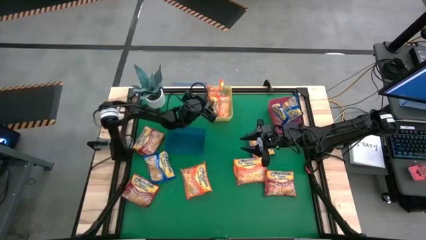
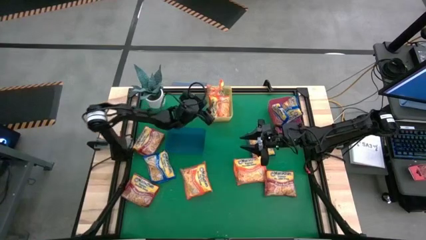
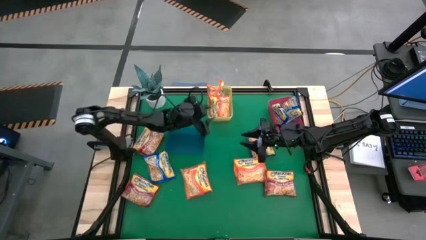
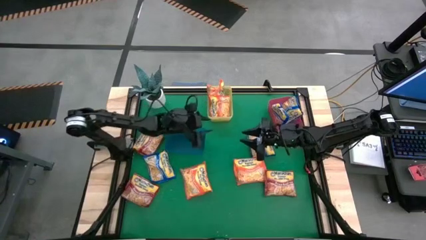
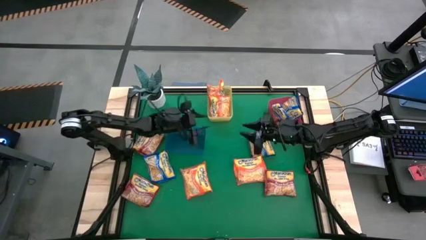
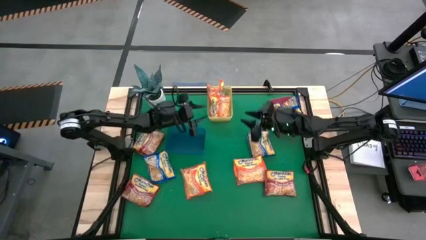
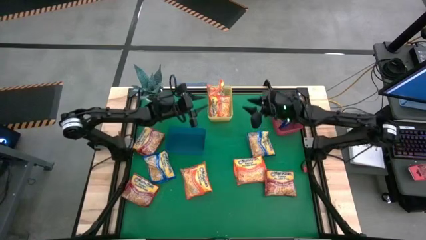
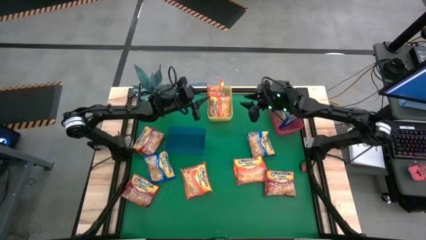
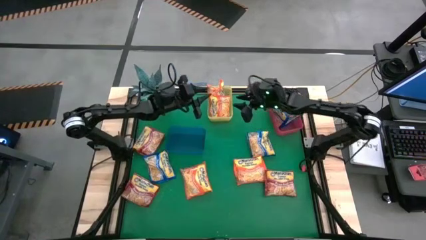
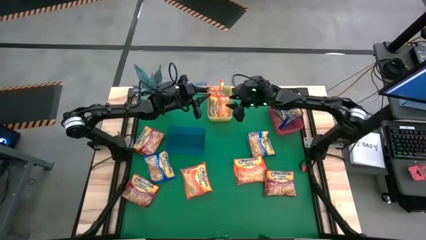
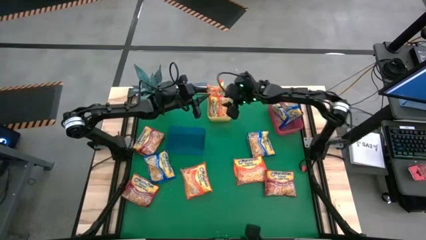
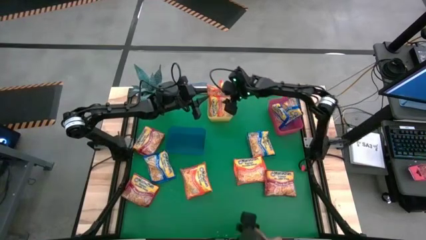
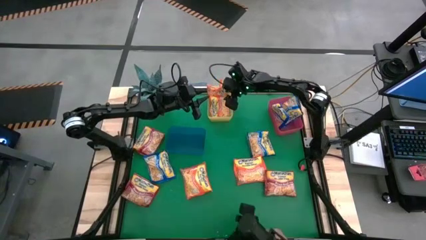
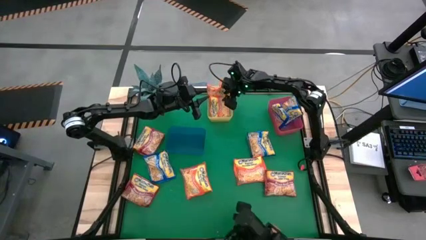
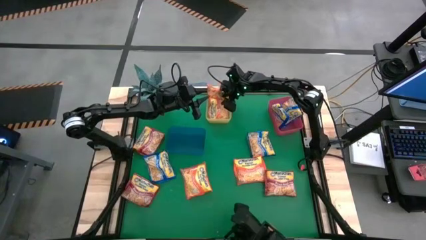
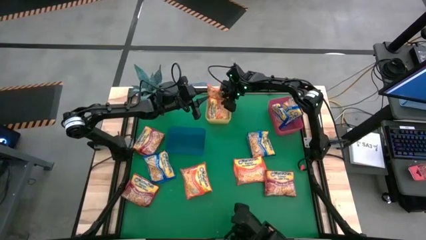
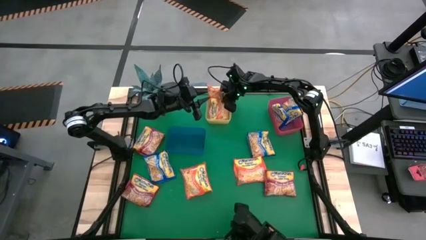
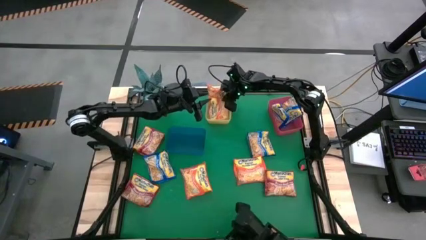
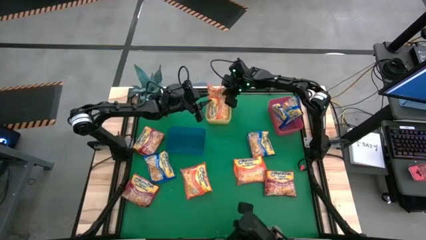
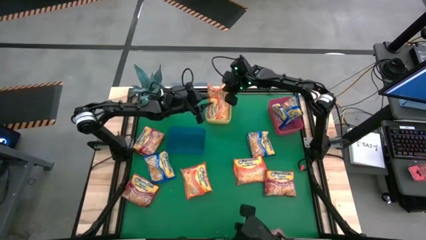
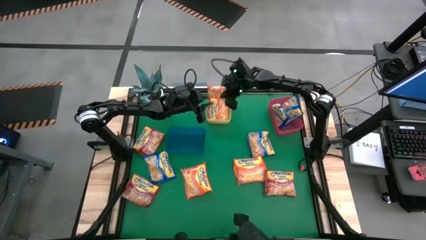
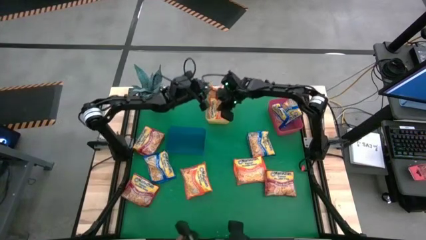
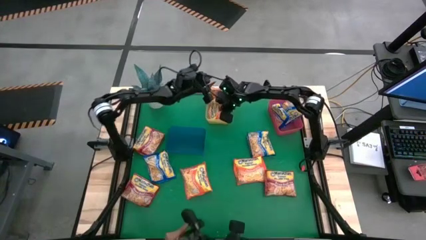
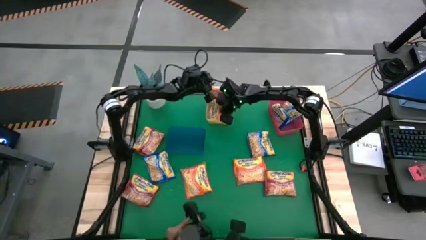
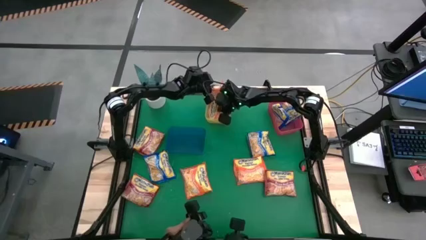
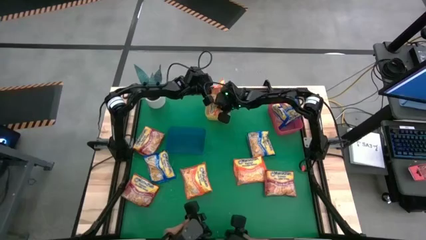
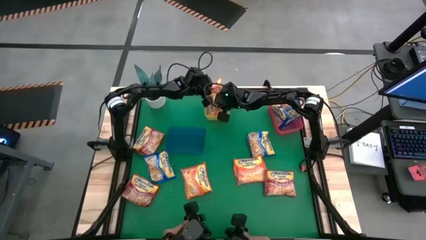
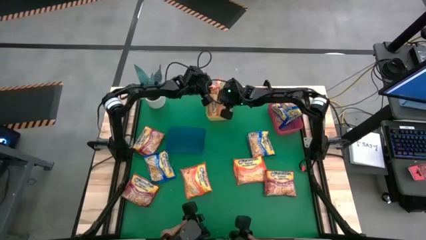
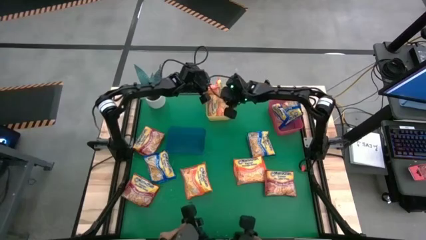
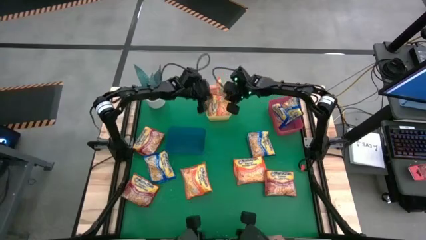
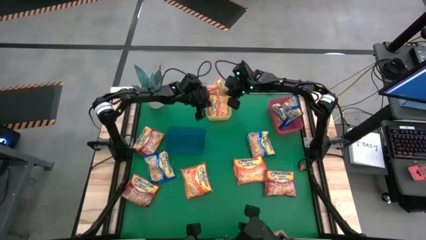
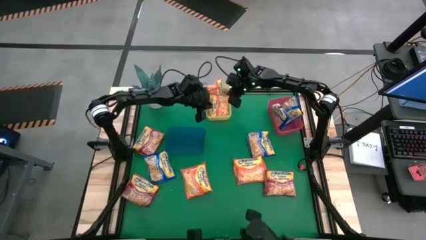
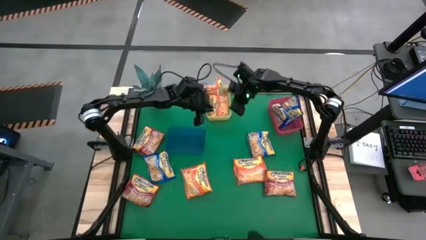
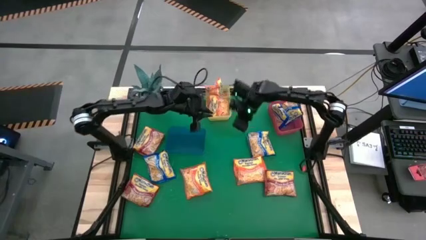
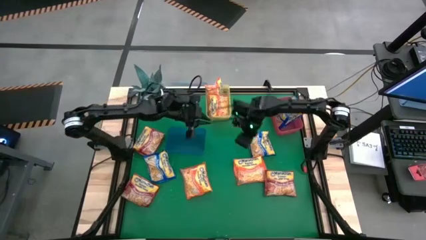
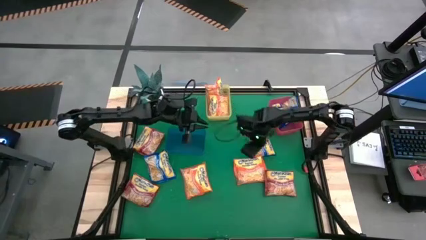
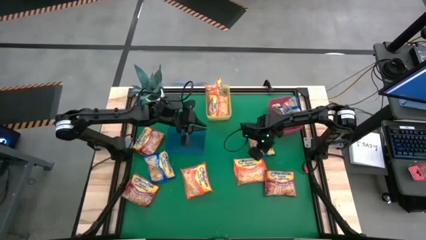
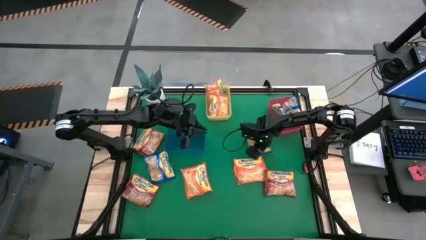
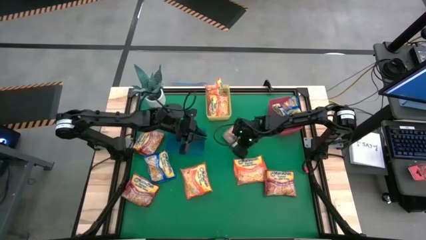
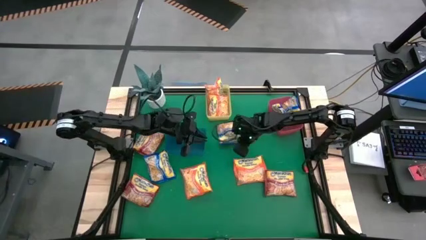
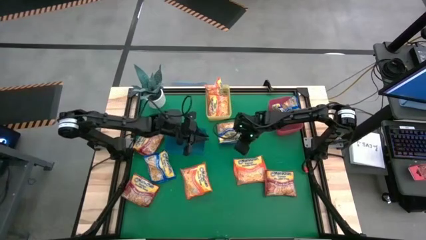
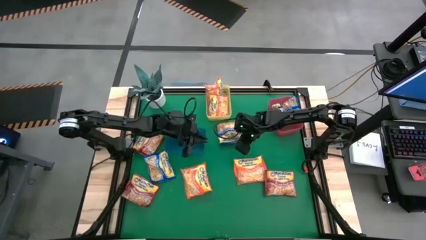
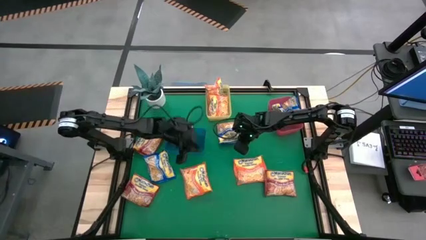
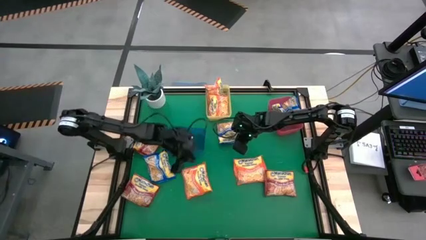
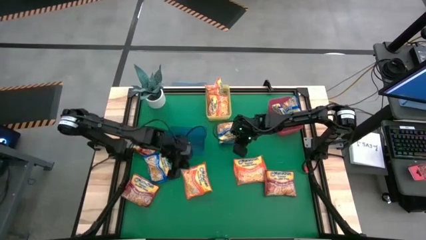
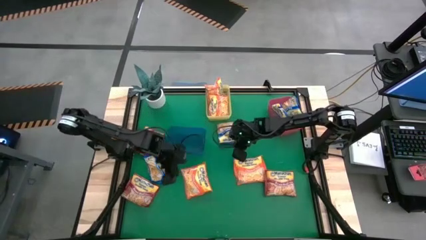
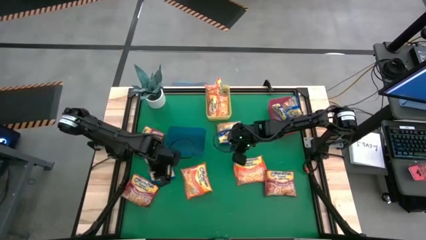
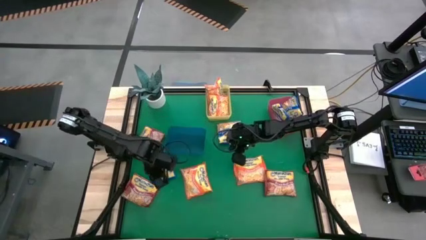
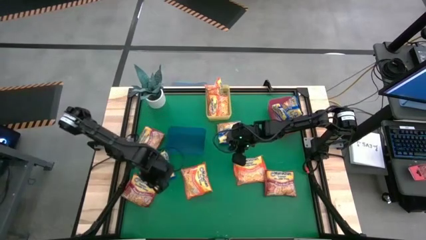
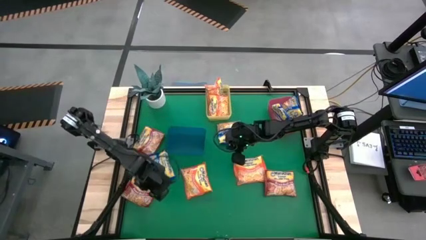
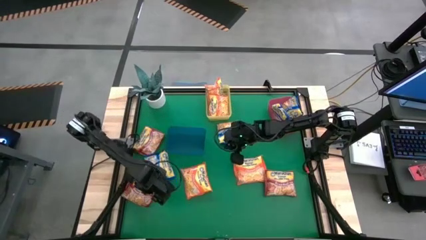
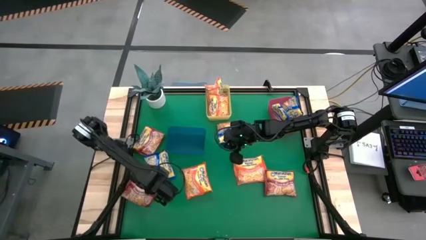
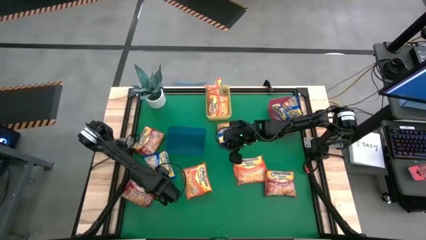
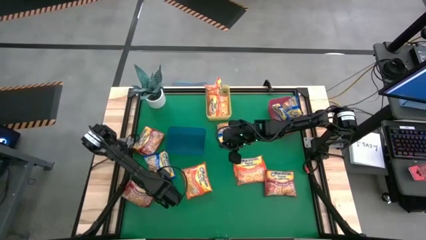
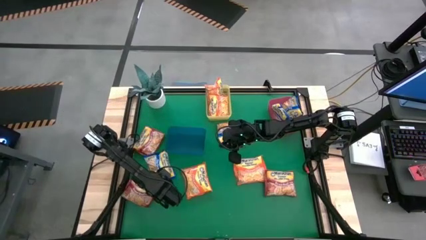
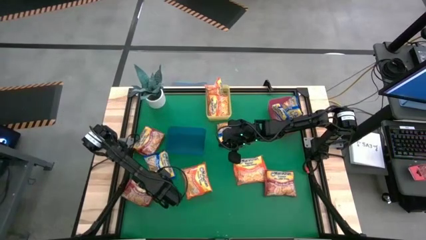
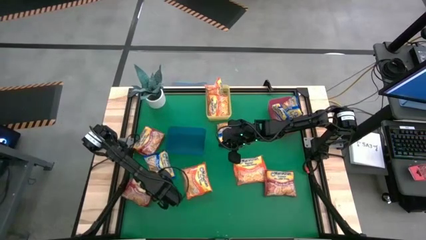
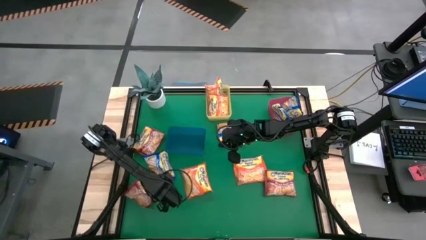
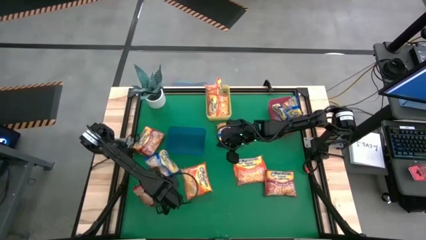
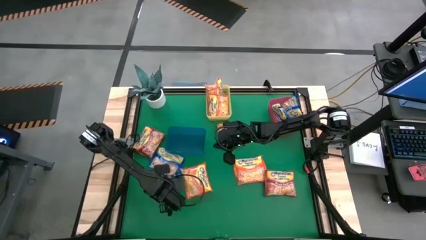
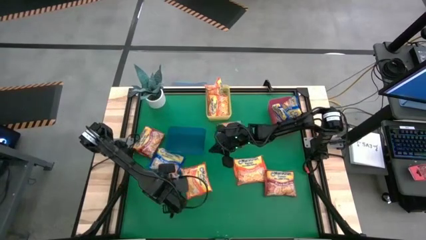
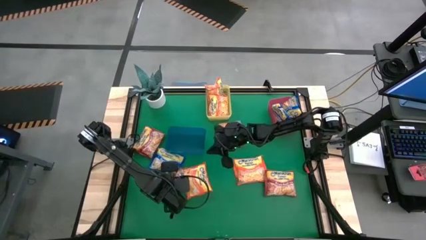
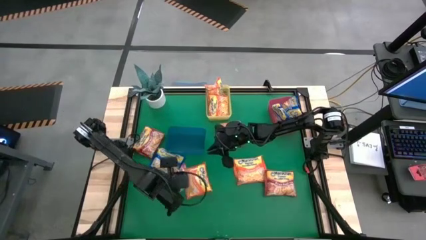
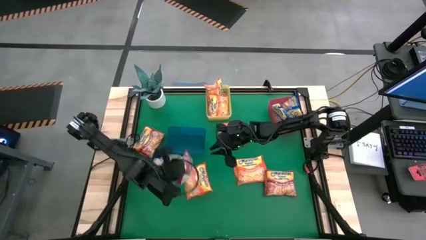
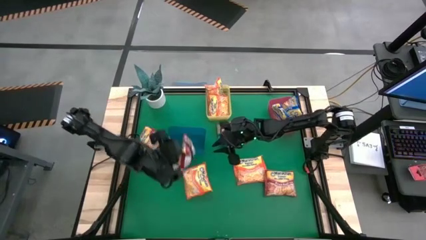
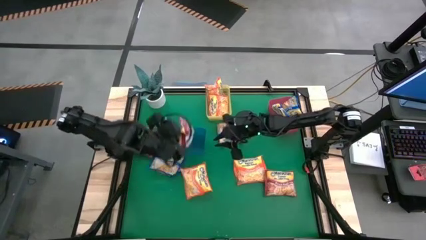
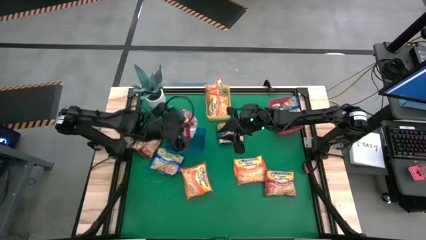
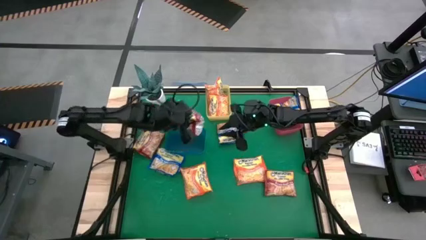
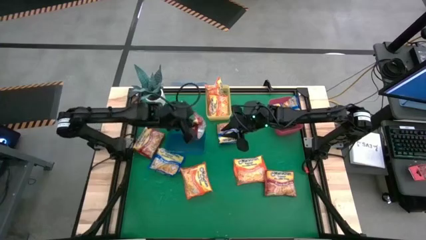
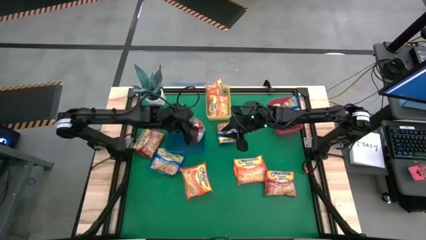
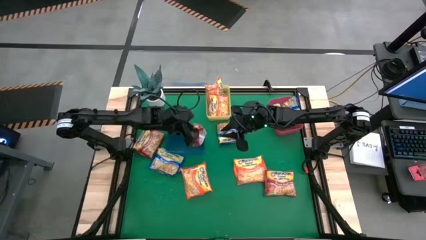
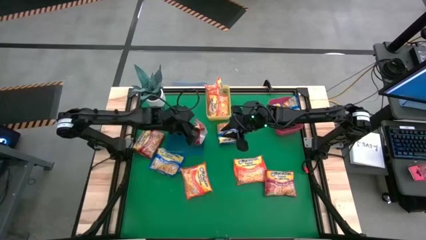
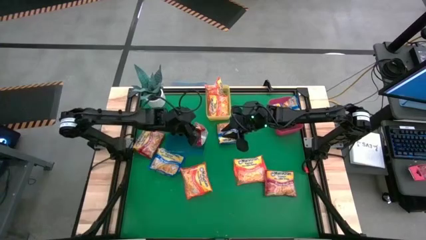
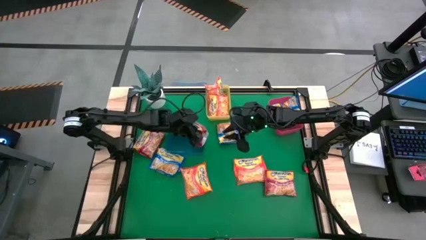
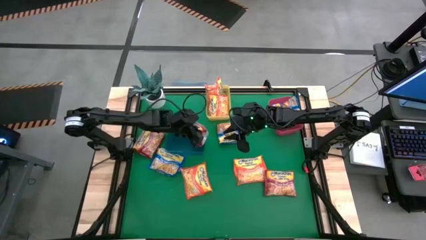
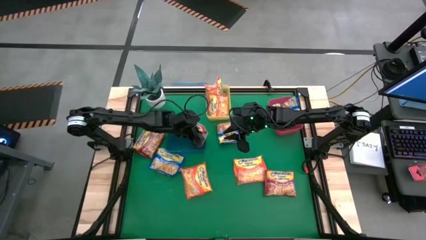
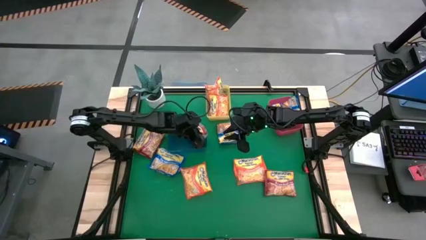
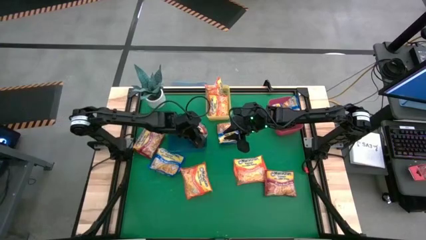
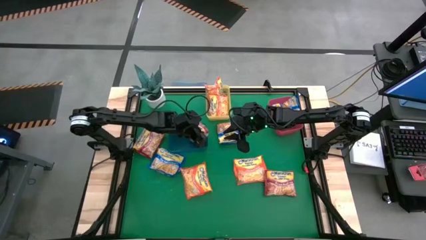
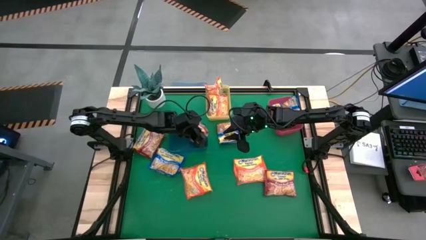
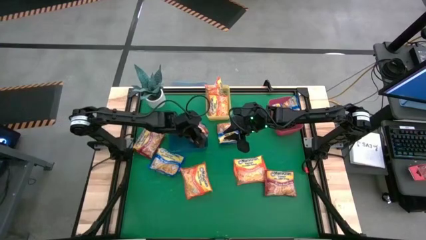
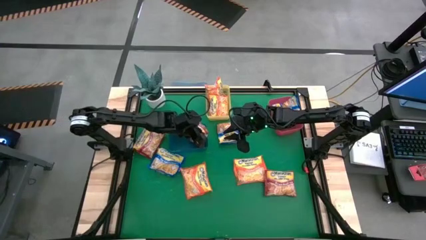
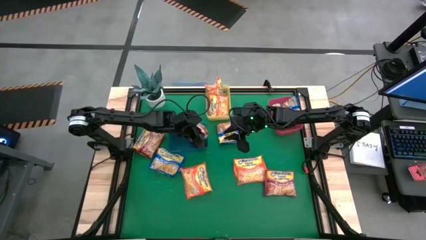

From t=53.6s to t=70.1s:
Task: Sort Maruchan noodles
Put the red noodle pack into the blue bin
